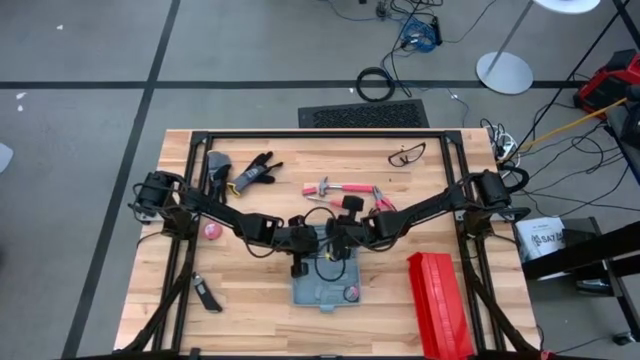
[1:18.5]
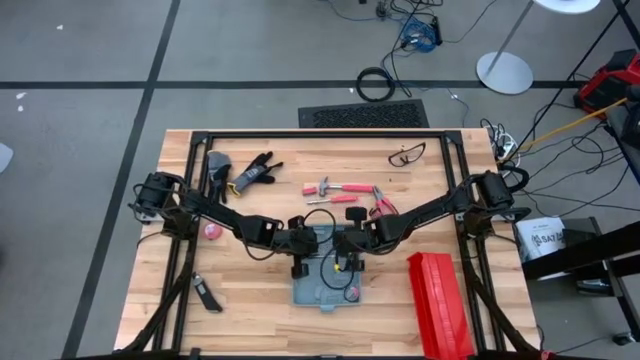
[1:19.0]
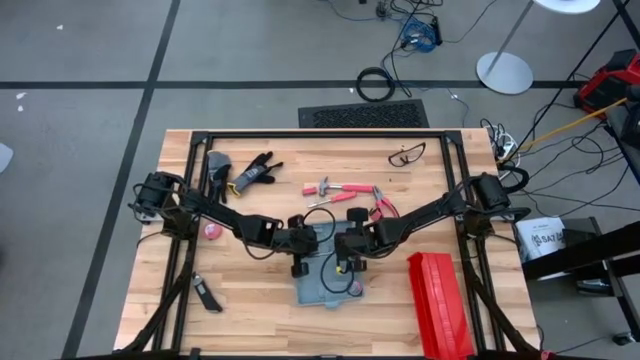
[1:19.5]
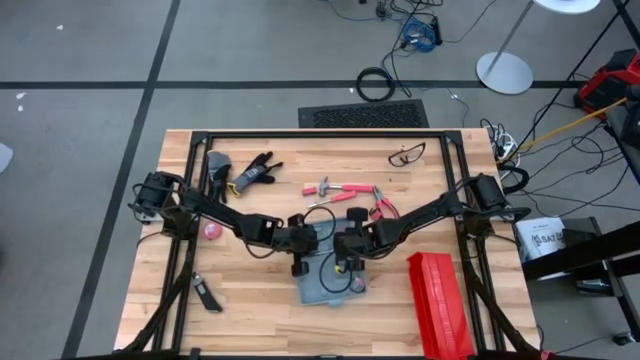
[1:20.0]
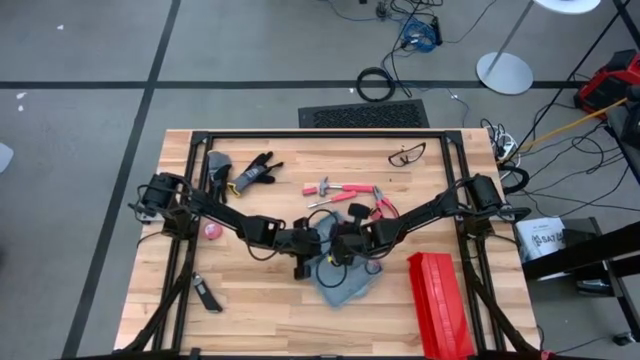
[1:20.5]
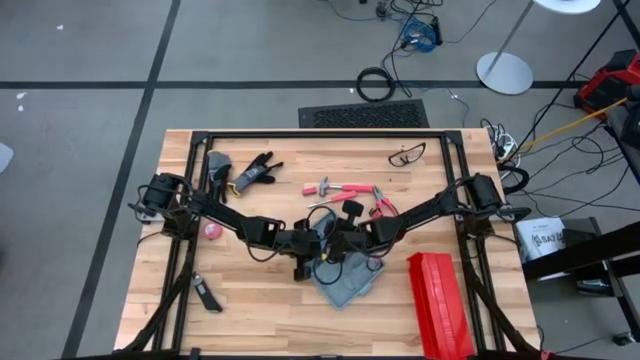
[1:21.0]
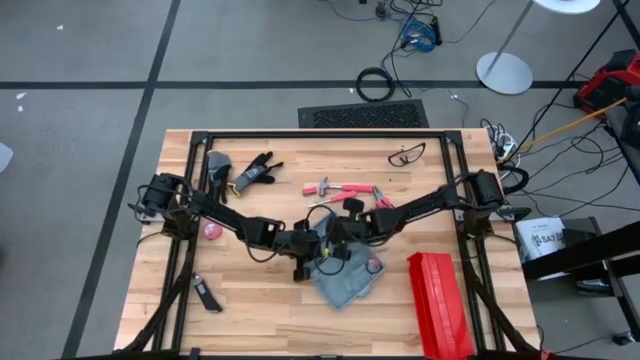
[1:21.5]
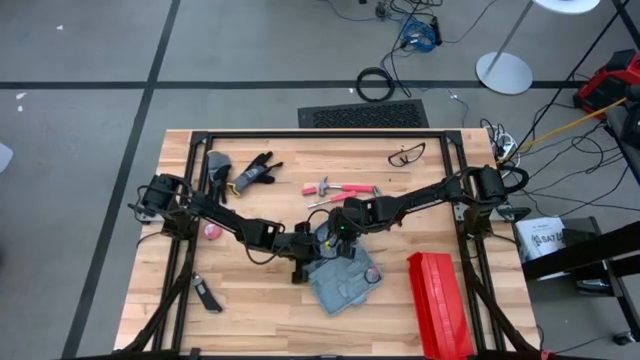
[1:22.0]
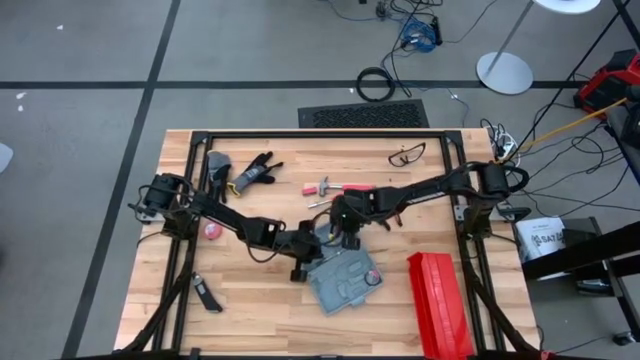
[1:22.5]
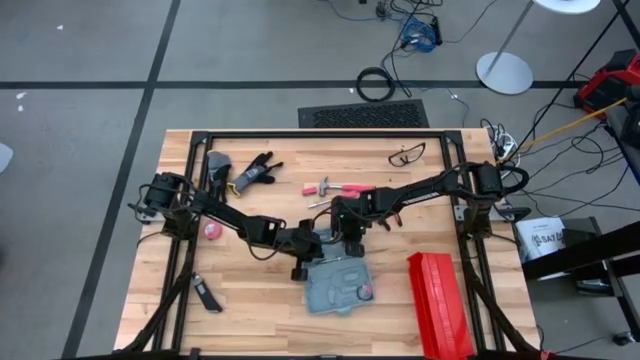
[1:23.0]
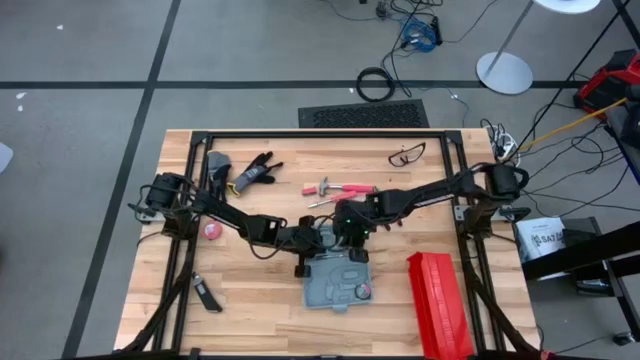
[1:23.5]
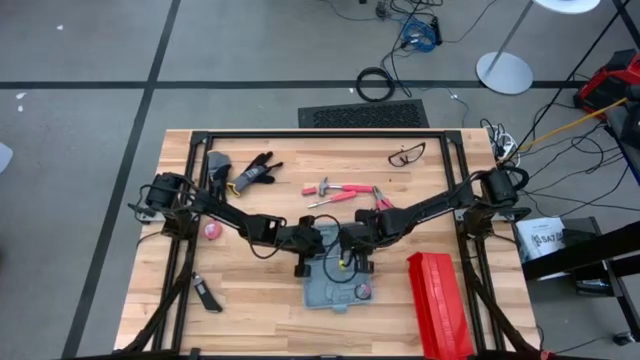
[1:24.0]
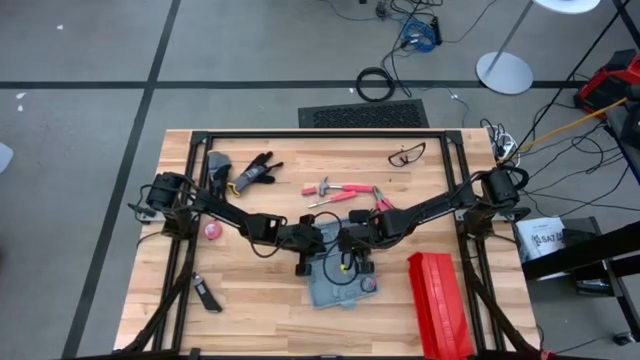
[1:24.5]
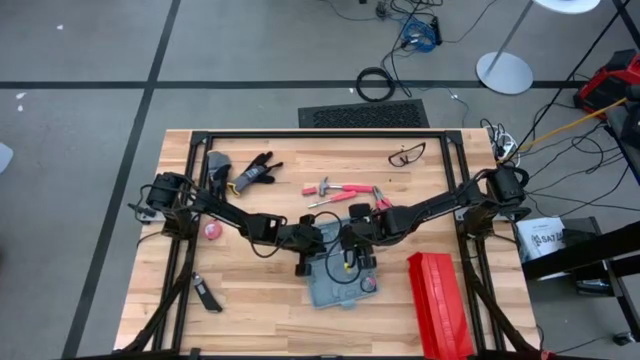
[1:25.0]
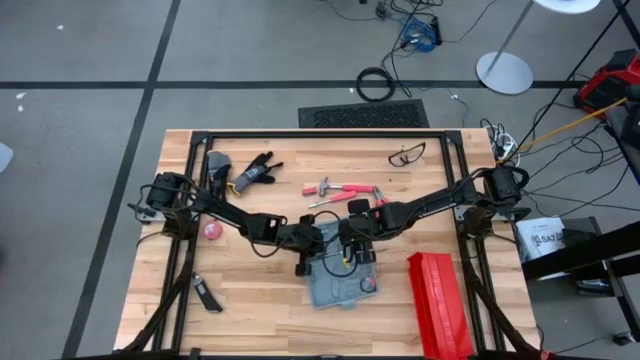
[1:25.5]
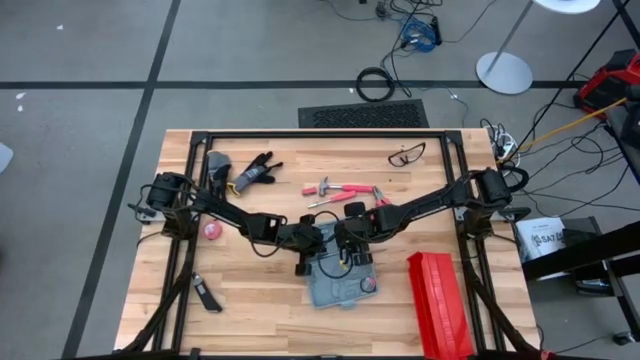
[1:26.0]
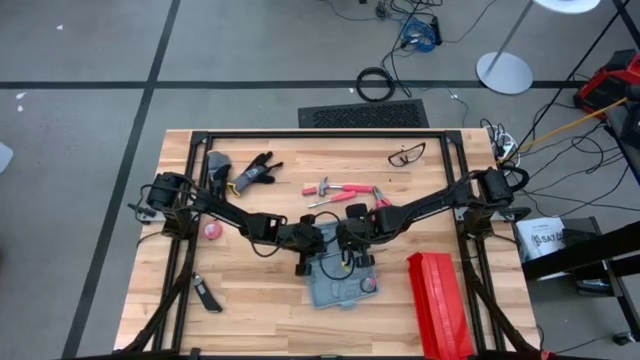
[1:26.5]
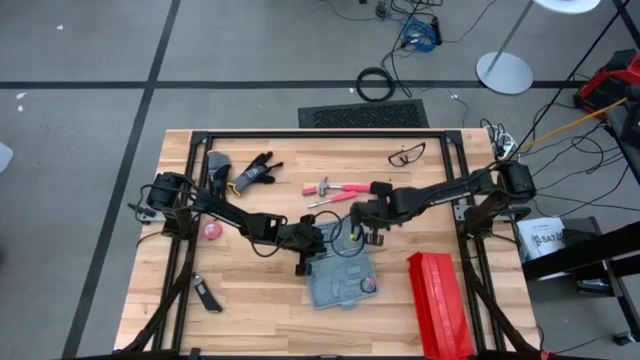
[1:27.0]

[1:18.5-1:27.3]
Task: prefit tool cases
Remove the red terminal block from the gray prefit tools case

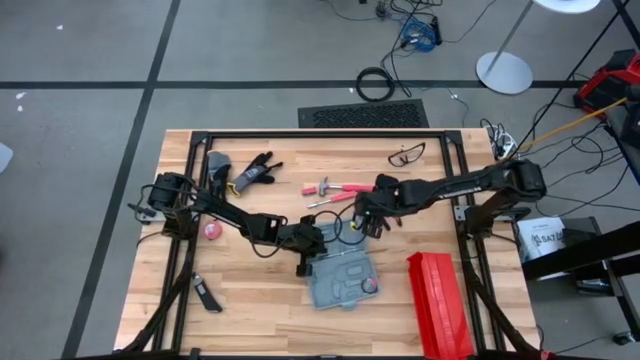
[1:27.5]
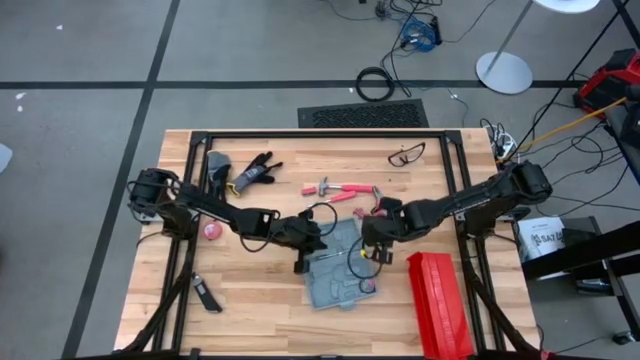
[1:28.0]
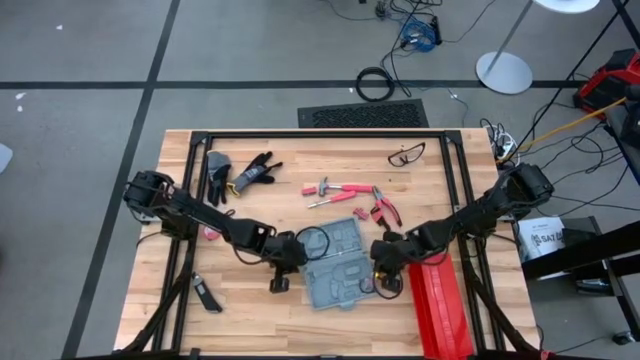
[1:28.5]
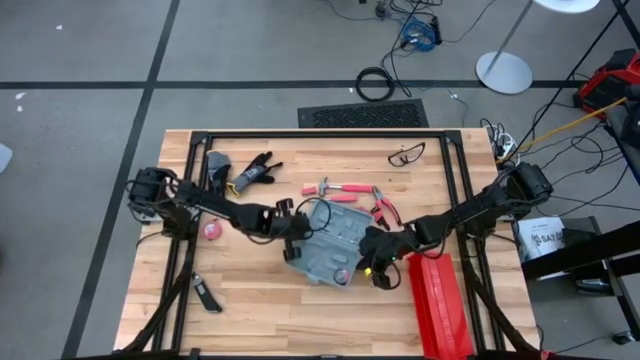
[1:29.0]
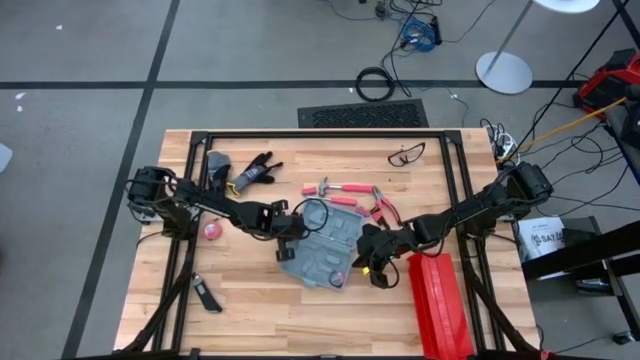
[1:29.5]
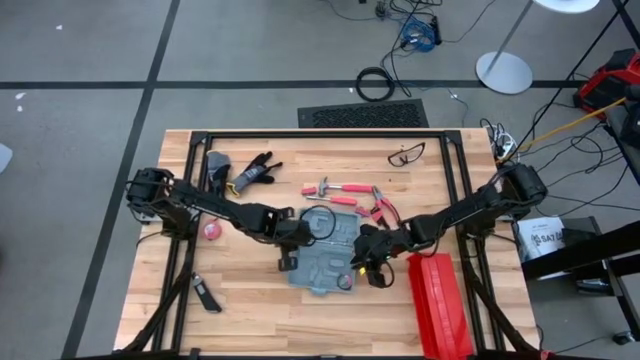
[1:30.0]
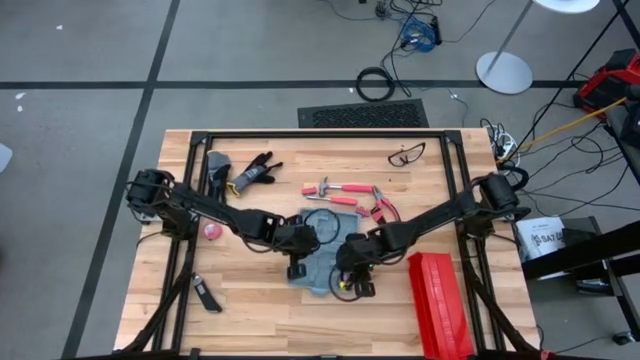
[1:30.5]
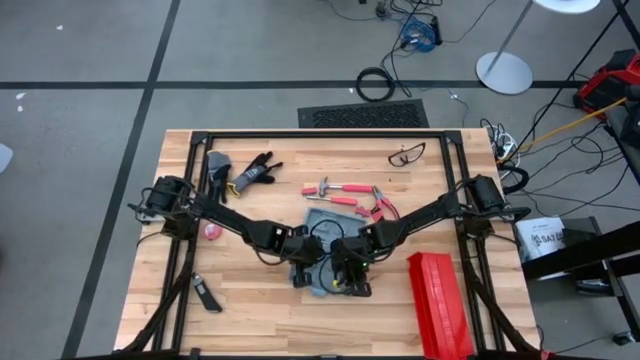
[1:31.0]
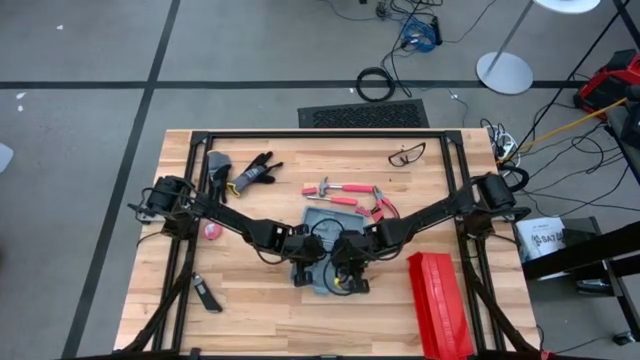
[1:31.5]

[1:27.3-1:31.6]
Remove the black electrical tape from the gray prefit tools case

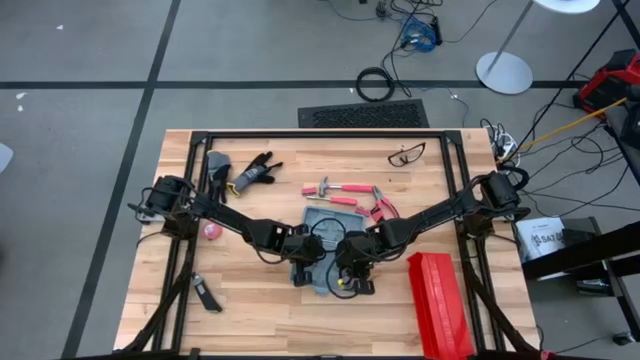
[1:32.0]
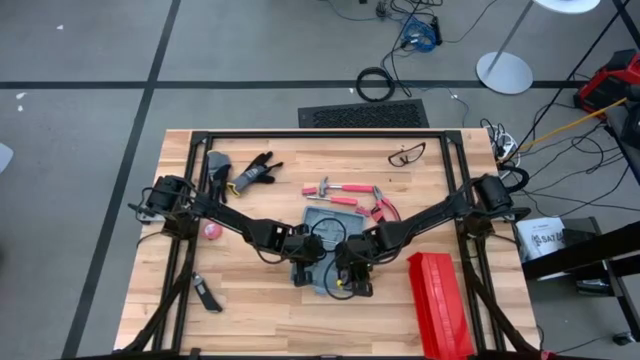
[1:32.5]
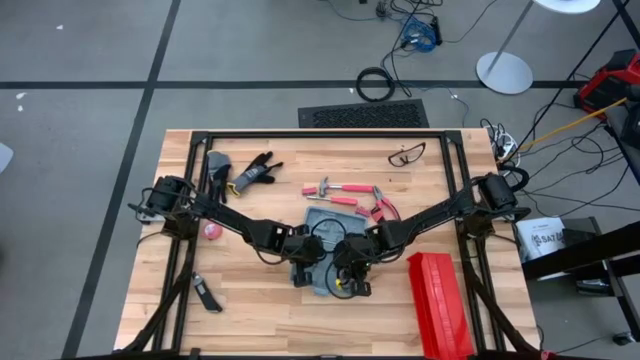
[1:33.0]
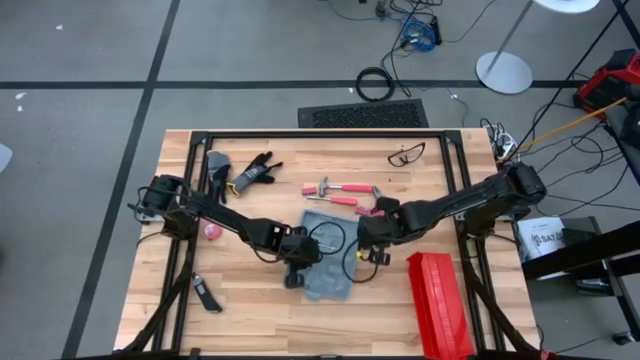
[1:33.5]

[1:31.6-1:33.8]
Remove the black electrical tape from the gray prefit tools case

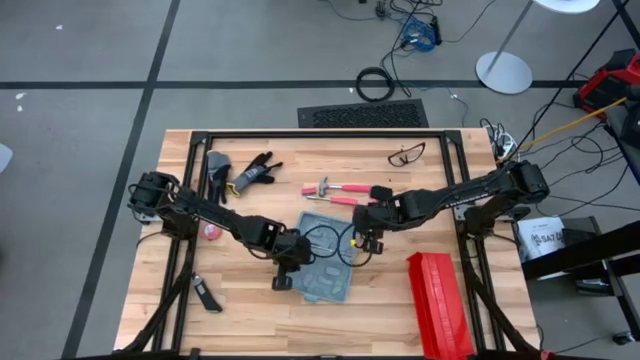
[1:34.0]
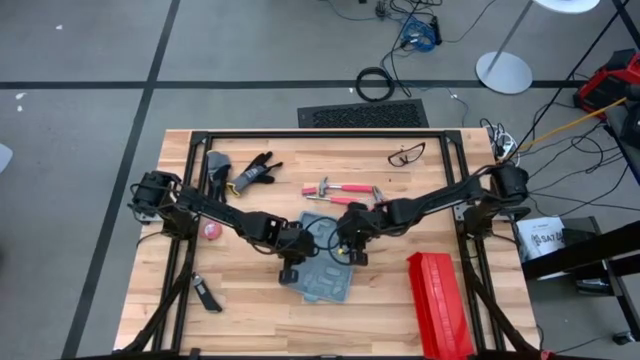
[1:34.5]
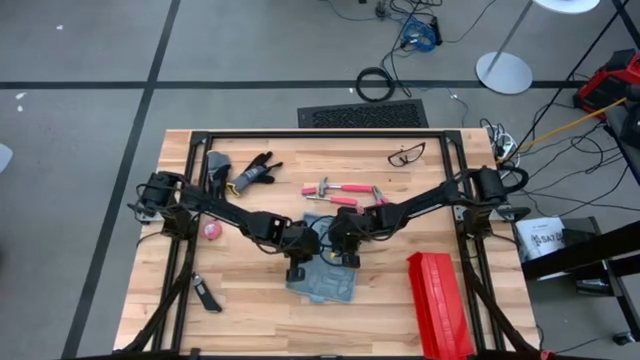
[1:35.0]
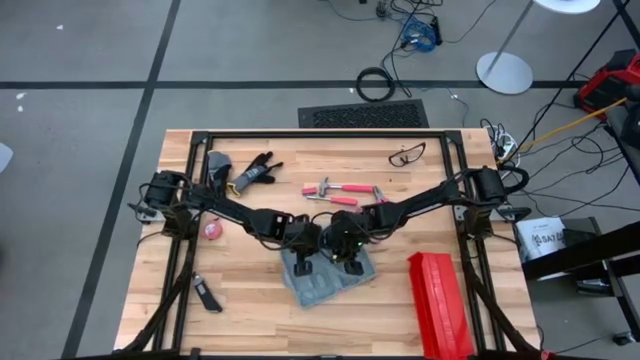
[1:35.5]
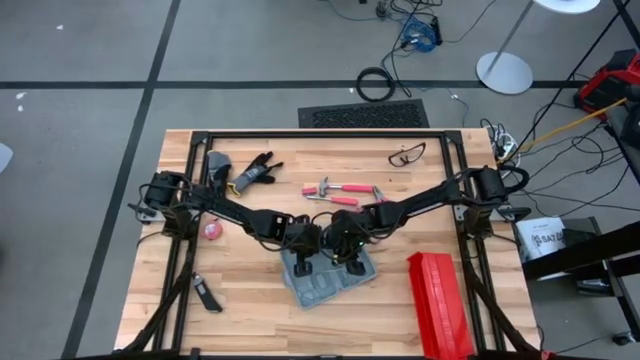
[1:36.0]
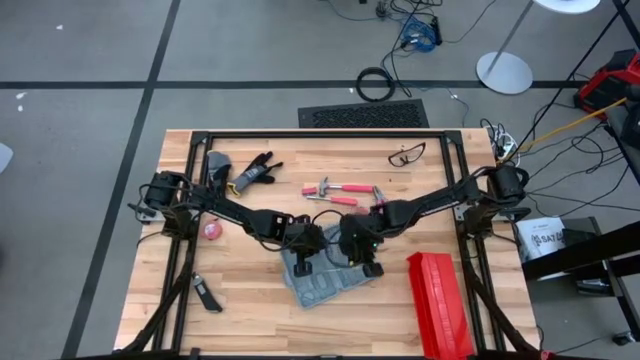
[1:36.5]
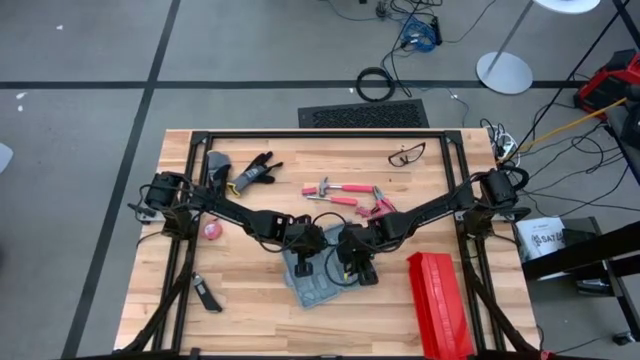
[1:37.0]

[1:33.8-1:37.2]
Remove the transparent screwdriver from the gray prefit tools case

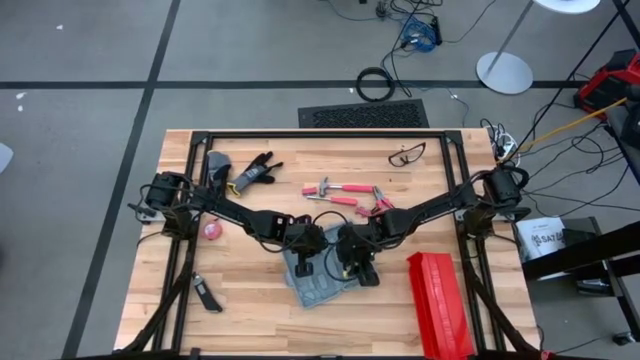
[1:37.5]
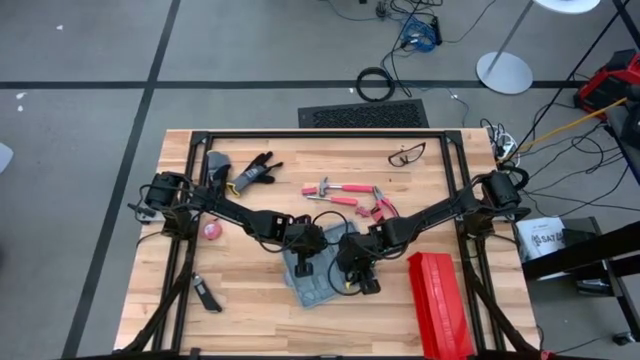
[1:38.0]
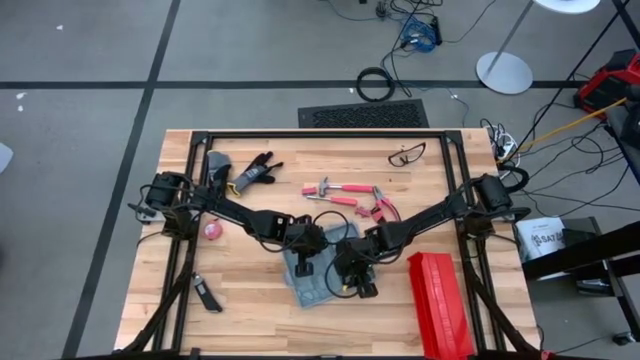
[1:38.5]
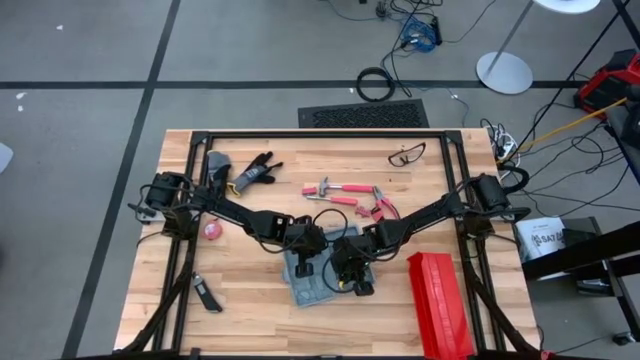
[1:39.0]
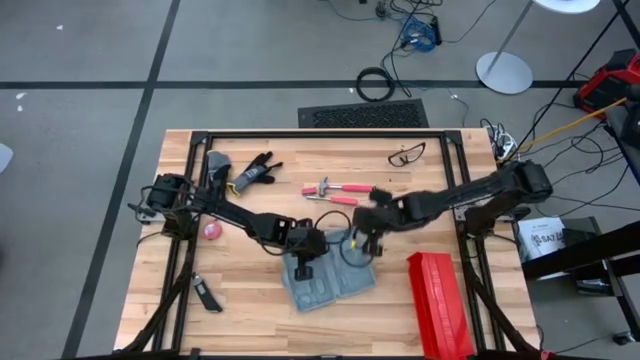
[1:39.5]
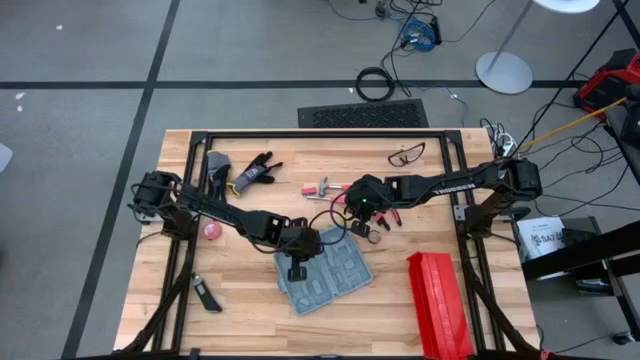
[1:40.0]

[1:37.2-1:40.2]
Remove the transparent screwdriver from the gray prefit tools case

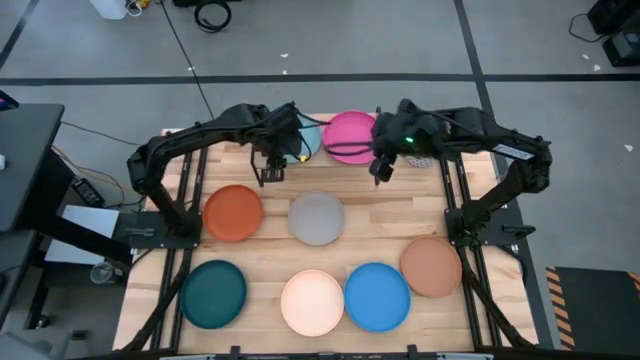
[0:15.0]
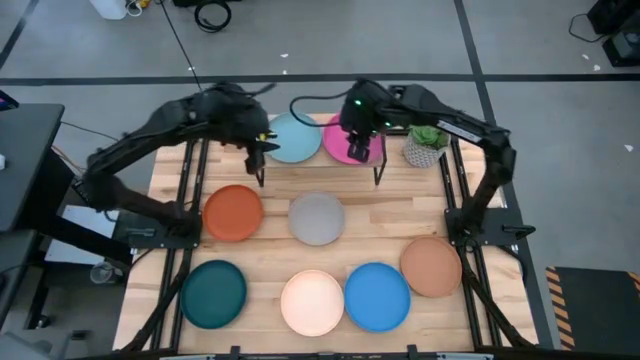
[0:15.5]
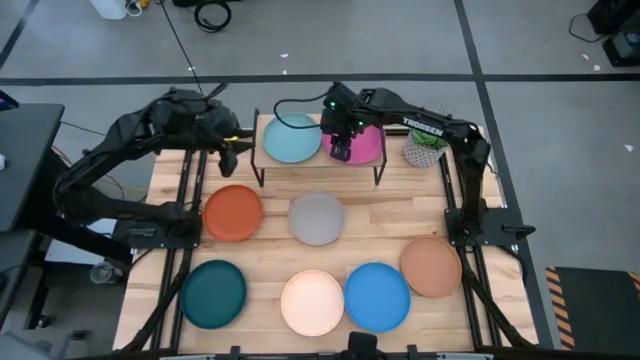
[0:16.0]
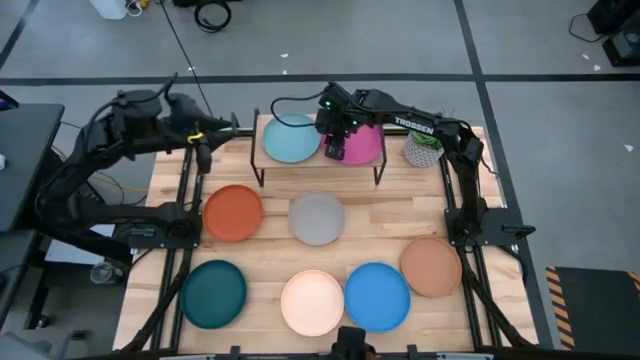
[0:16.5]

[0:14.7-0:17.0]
Task: Place and stack plates onto a shelf
Adjust the pink plate on the shelf
